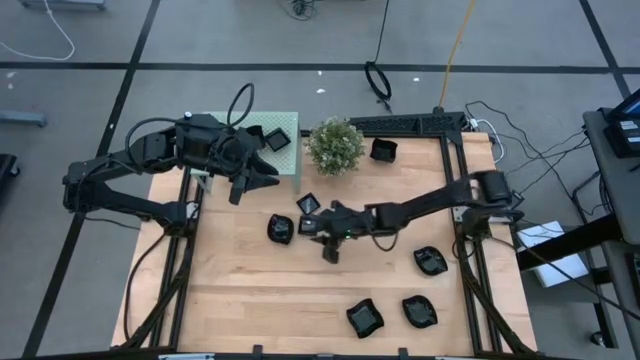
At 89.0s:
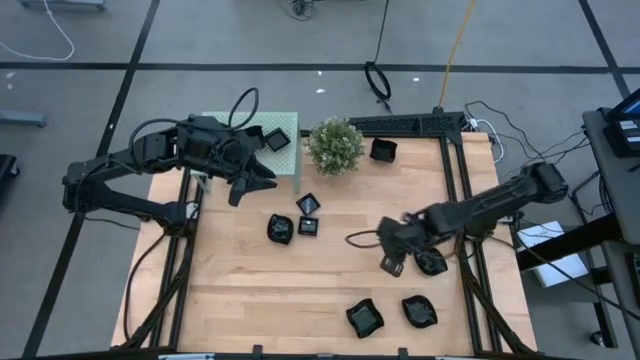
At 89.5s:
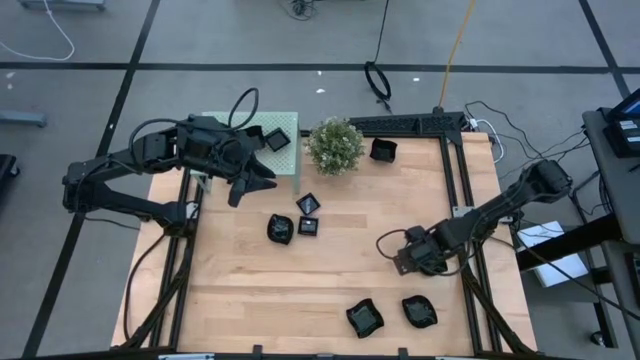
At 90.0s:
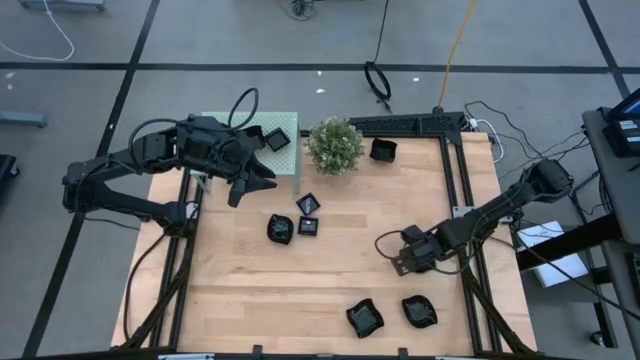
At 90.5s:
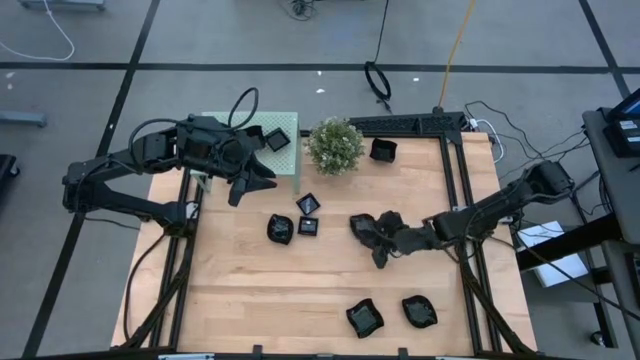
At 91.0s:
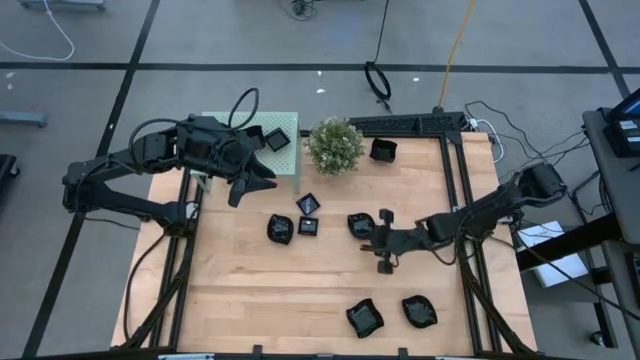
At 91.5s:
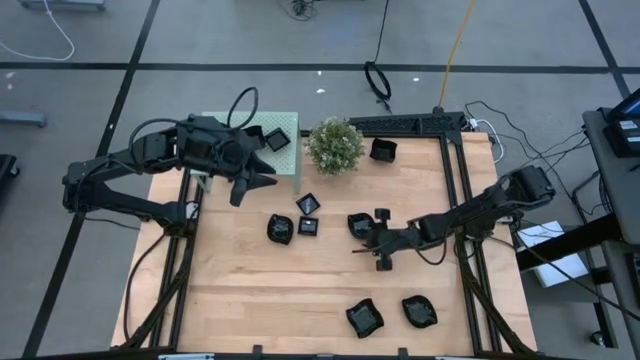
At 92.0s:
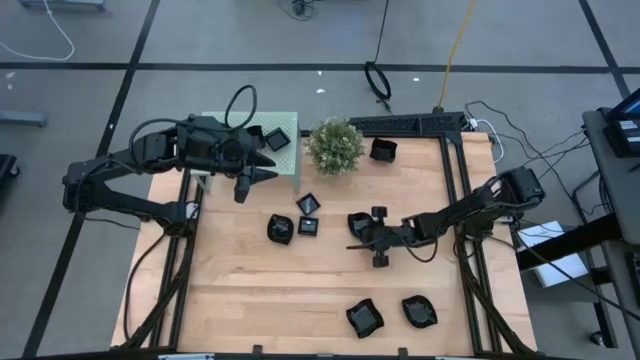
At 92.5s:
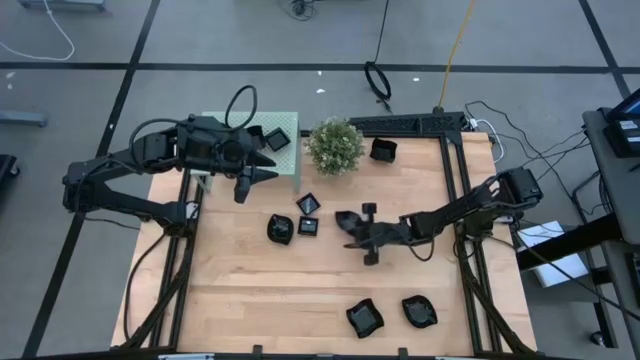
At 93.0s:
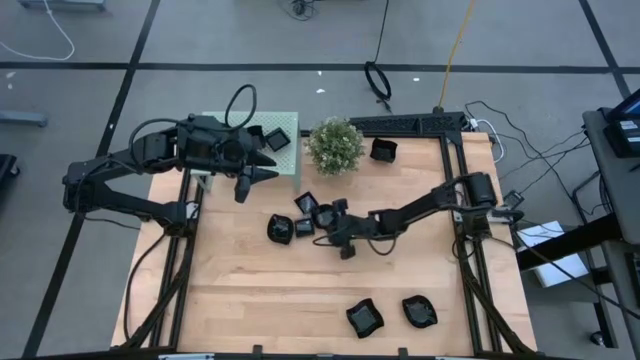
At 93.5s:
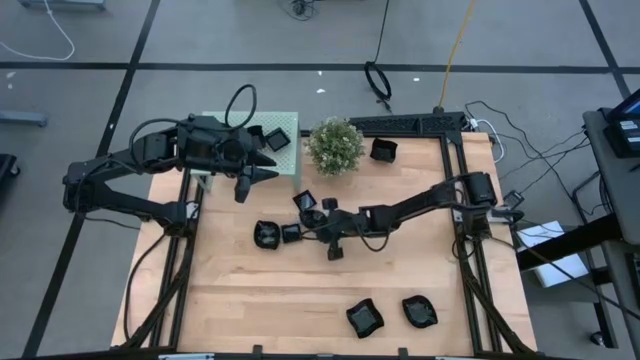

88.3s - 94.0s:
Task: Pick & Place Mini shaped plates
Move the leaf shape plate on the center of the table

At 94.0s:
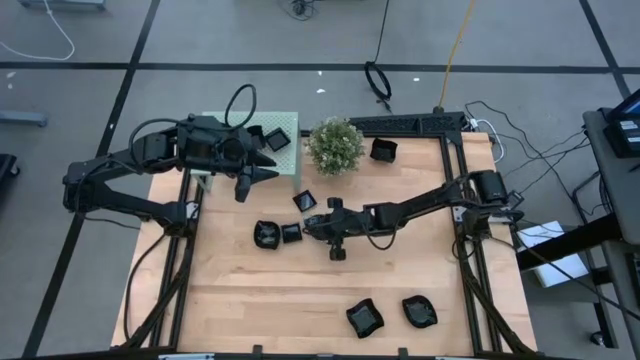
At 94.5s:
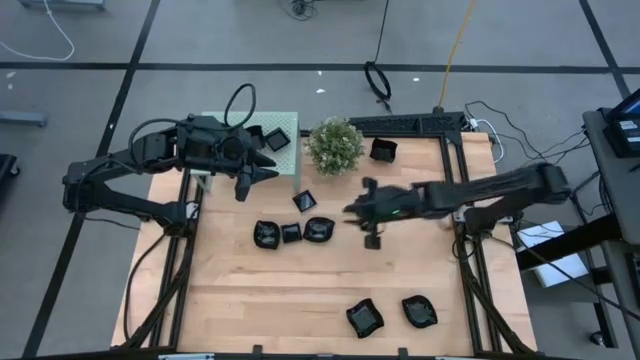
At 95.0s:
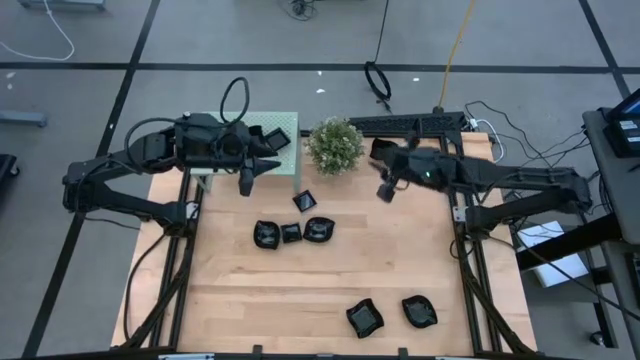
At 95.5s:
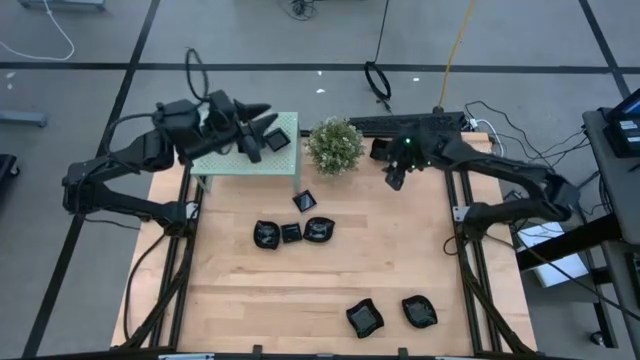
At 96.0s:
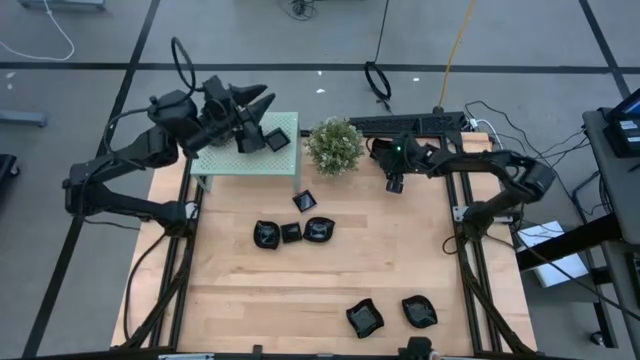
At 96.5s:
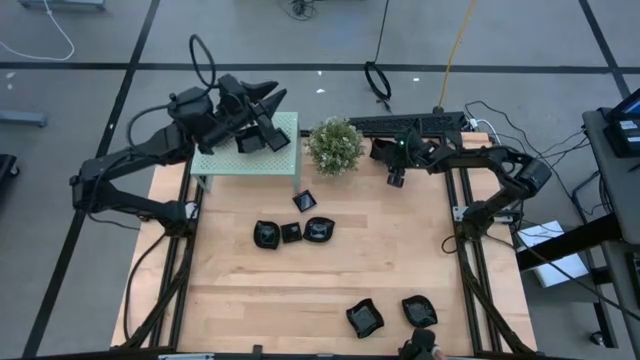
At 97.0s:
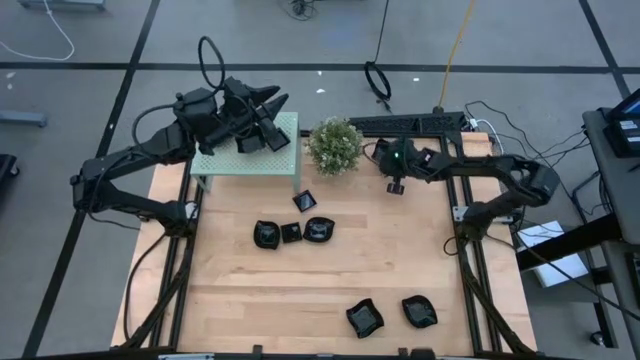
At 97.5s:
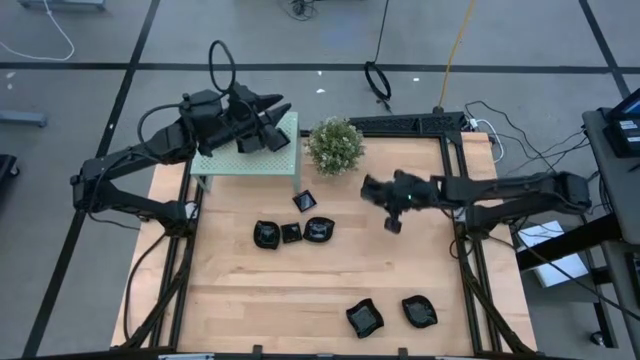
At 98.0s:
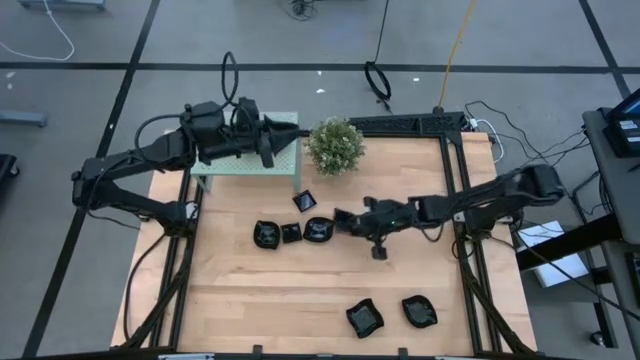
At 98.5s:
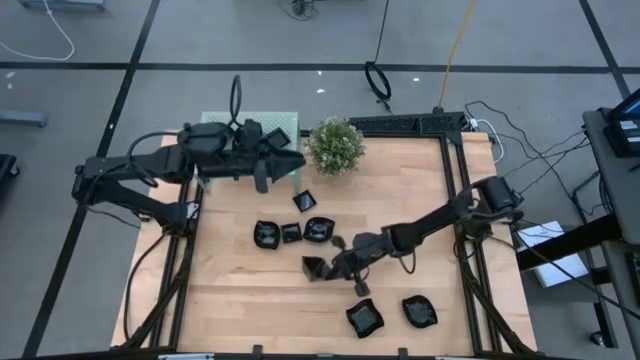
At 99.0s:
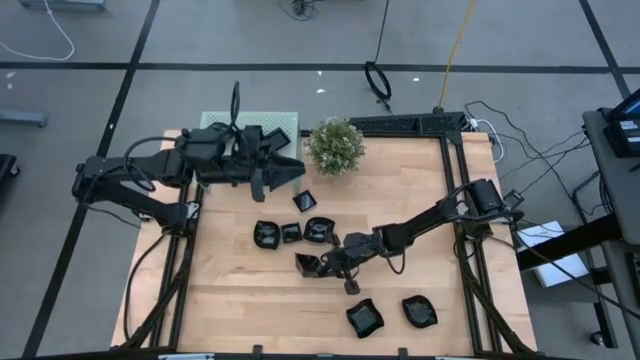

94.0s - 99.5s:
Move the distorted square plate on the center of the table

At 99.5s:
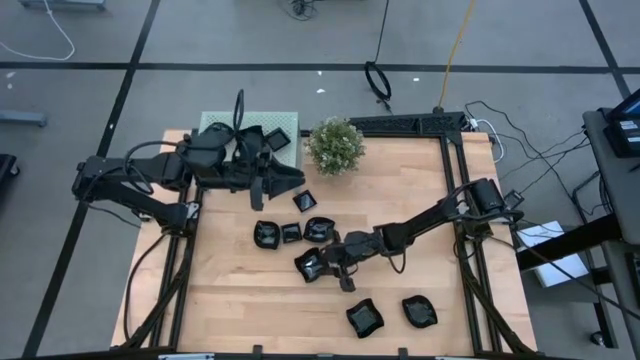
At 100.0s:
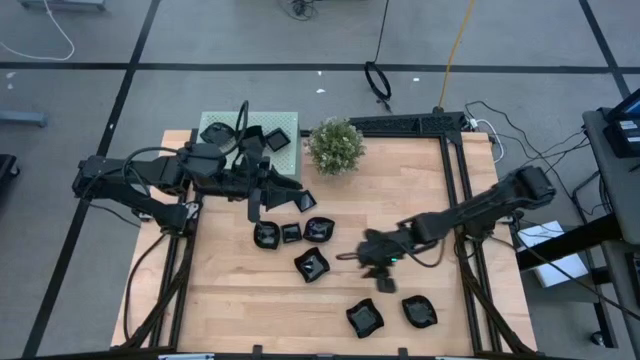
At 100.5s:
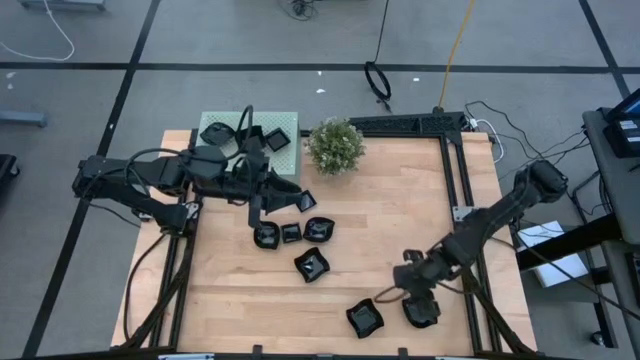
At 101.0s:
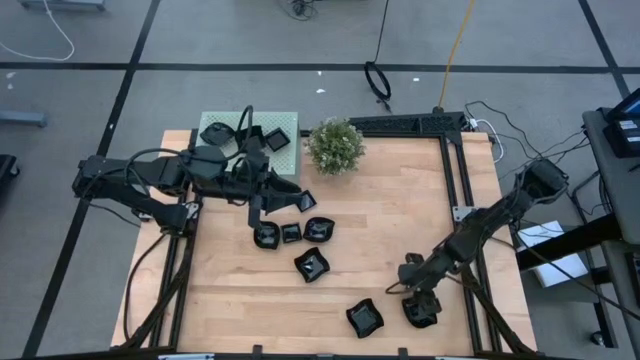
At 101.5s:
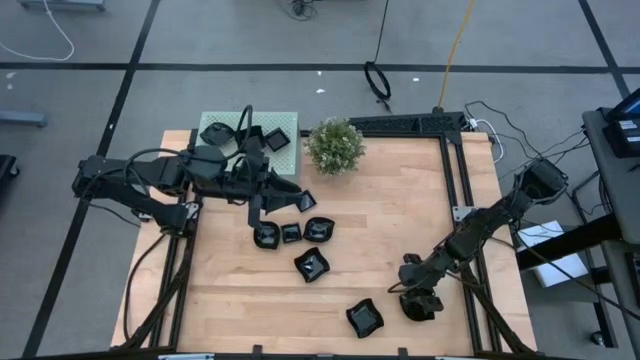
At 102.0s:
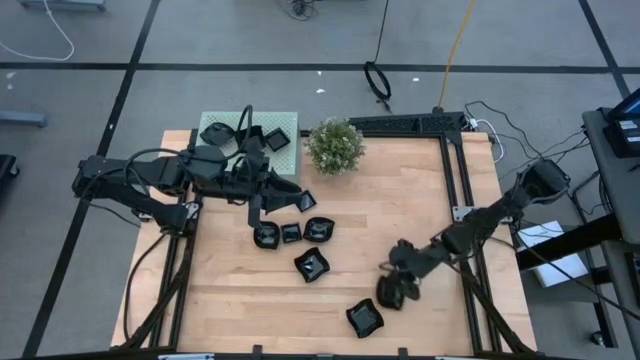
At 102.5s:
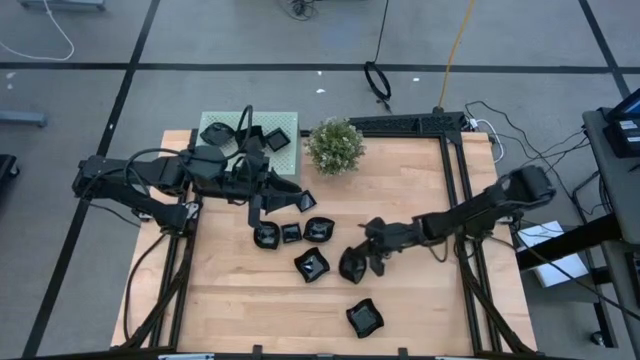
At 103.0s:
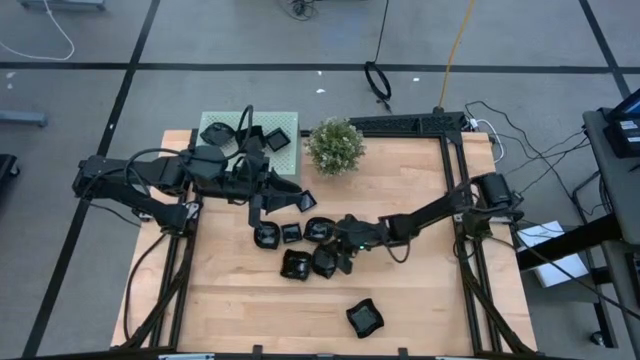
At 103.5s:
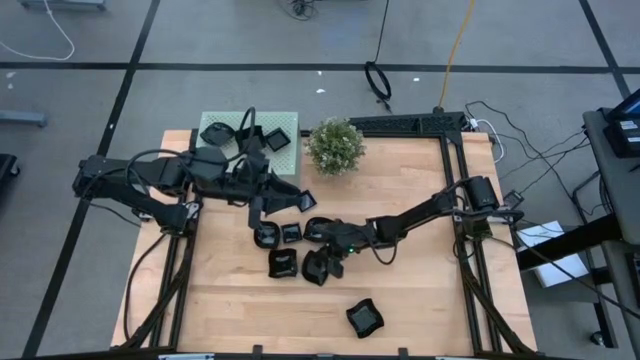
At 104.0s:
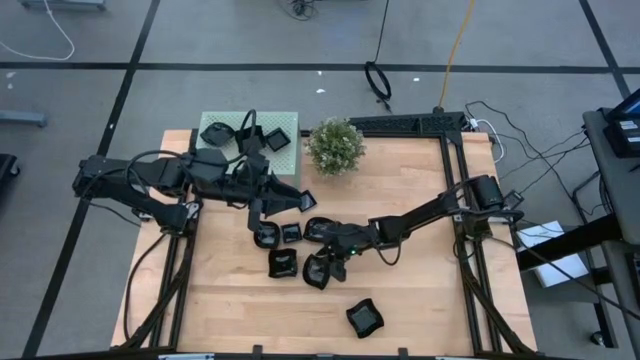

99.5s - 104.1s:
Move the leaf shape plate on the center of the table

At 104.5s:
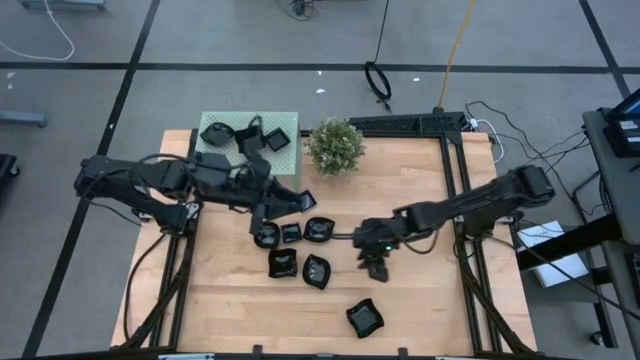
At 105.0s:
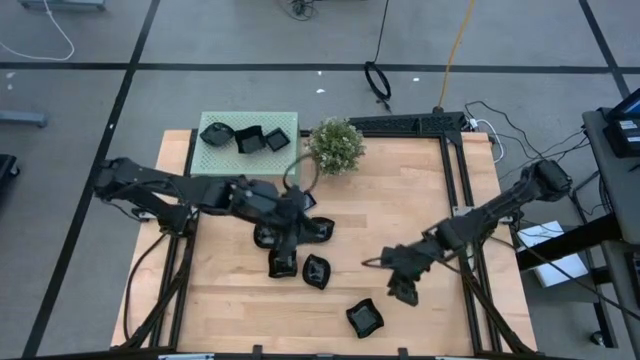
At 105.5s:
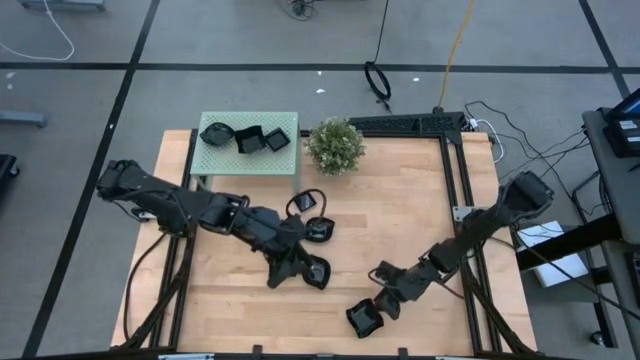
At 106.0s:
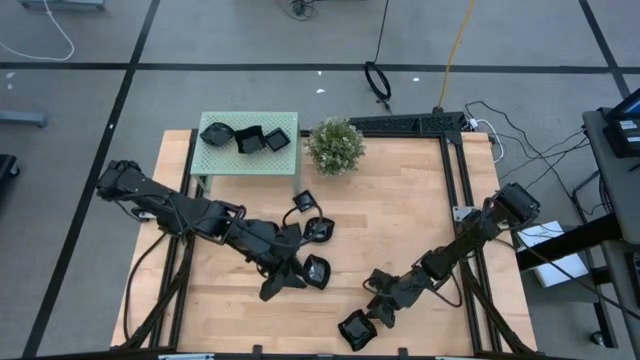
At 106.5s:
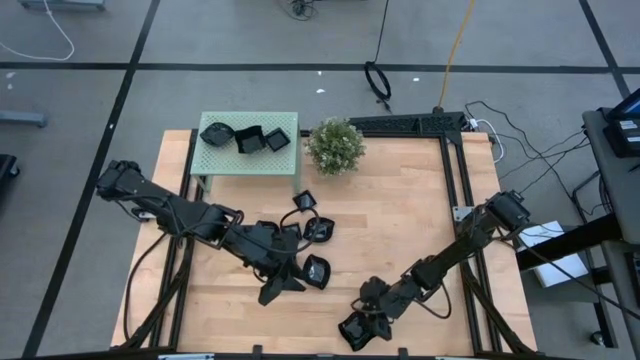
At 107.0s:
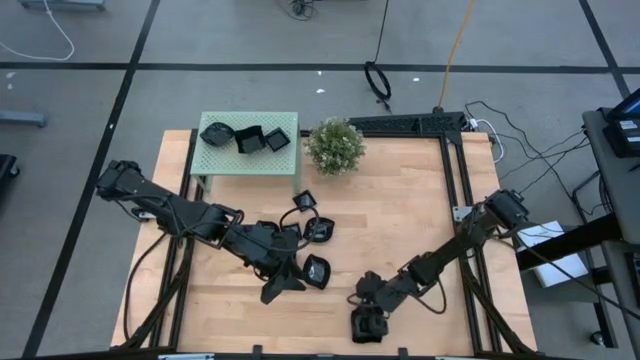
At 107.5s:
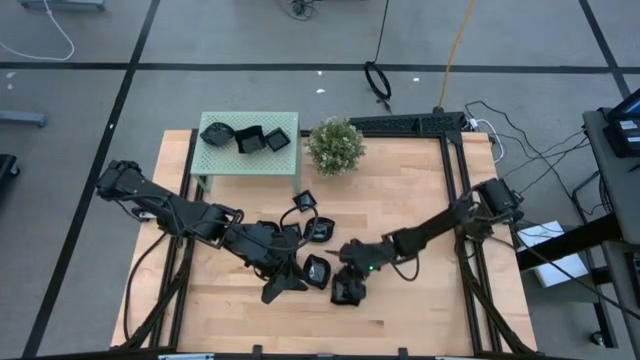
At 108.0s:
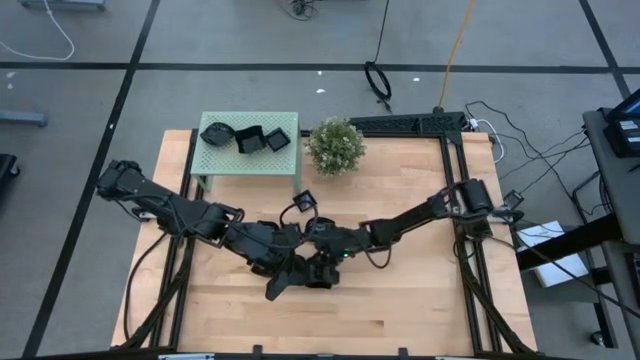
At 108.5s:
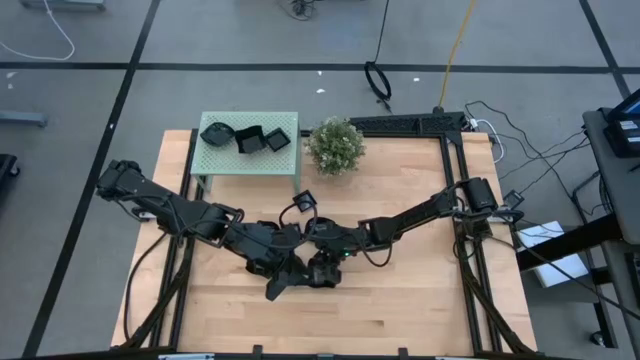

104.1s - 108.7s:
Move the distorted square plate on the center of the table

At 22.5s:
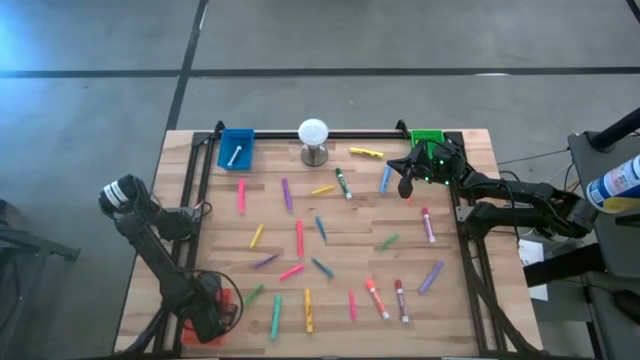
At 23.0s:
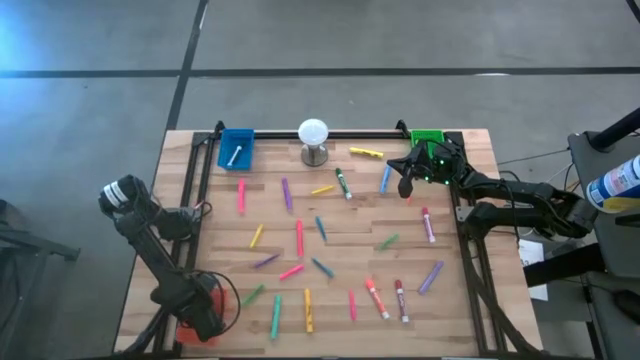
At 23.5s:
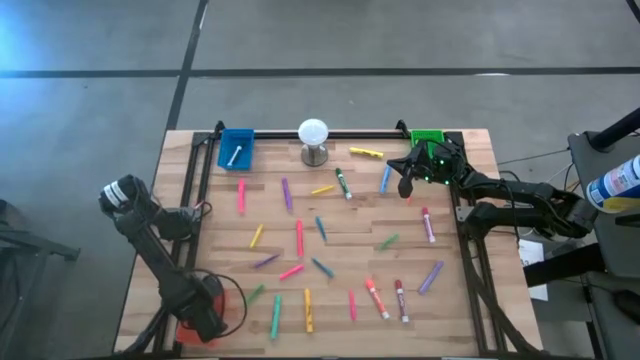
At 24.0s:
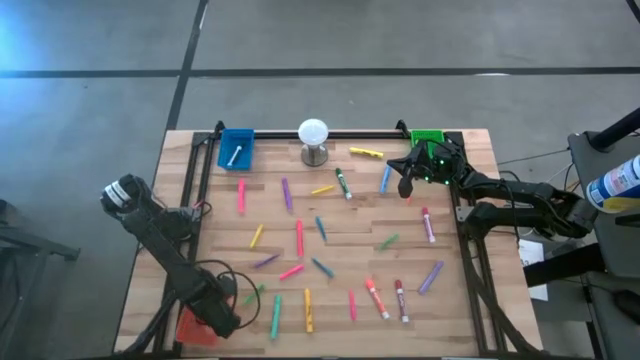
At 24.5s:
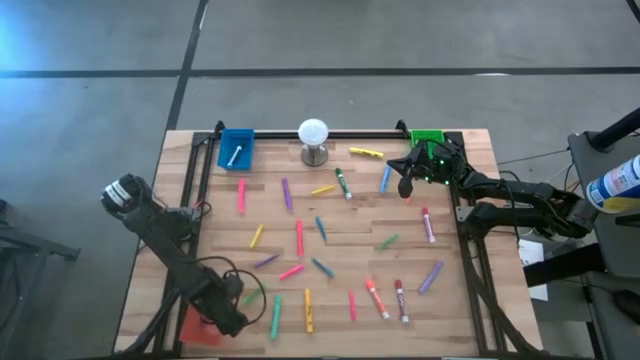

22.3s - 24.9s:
Task: Pick & Place Markers
Adjust the orange bin on the table
